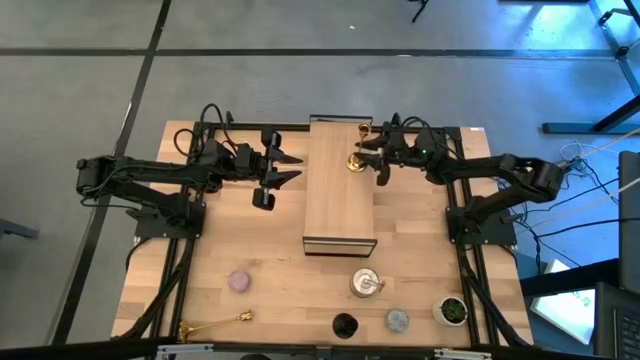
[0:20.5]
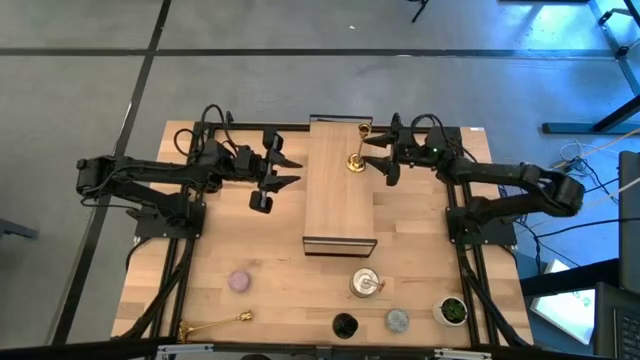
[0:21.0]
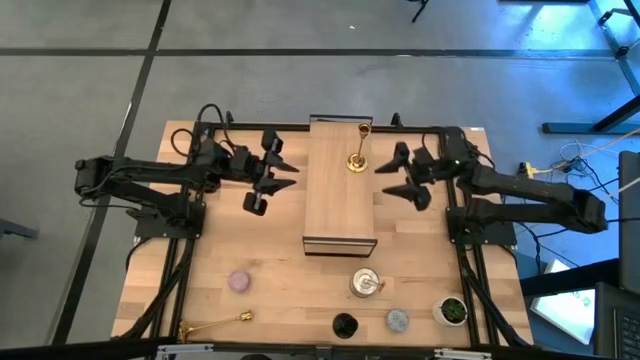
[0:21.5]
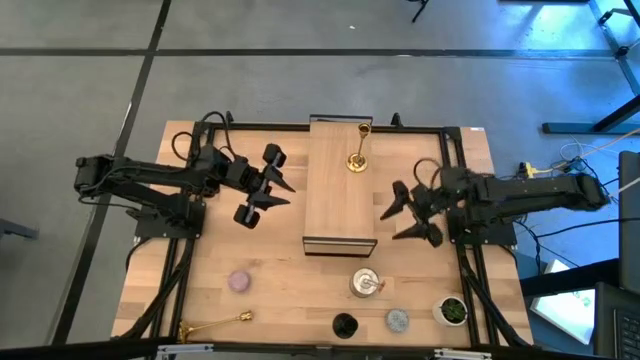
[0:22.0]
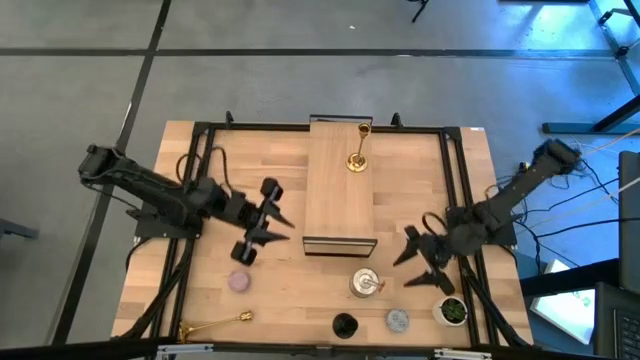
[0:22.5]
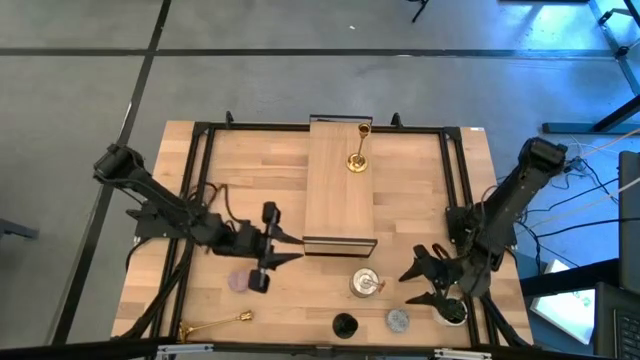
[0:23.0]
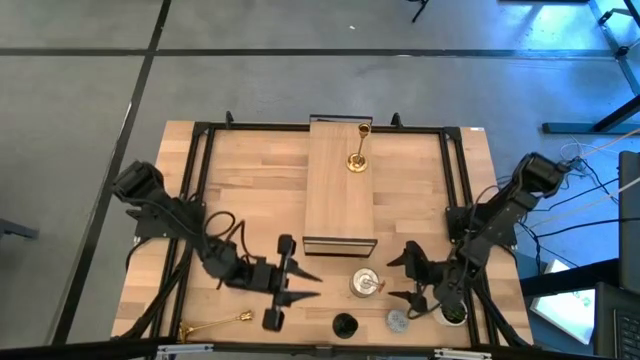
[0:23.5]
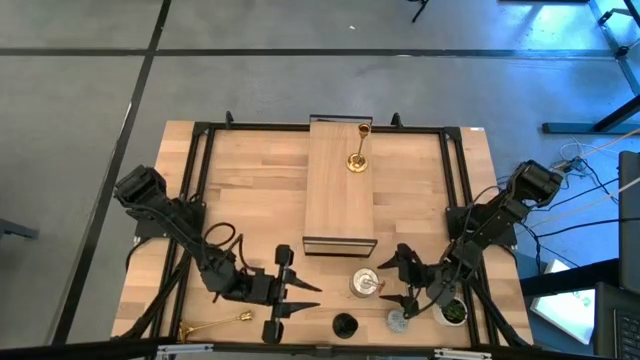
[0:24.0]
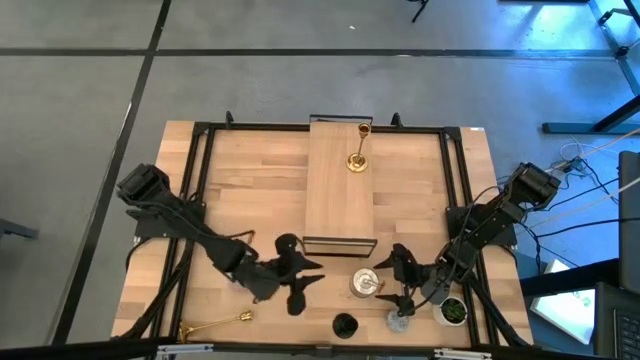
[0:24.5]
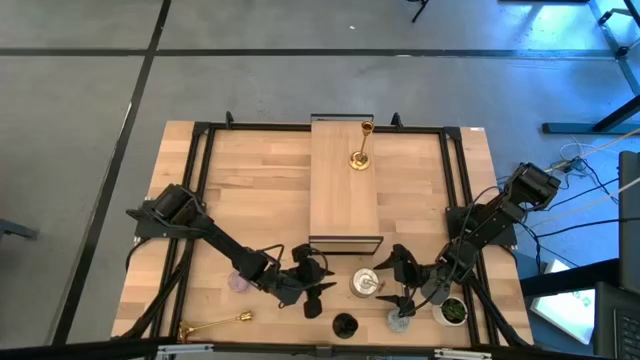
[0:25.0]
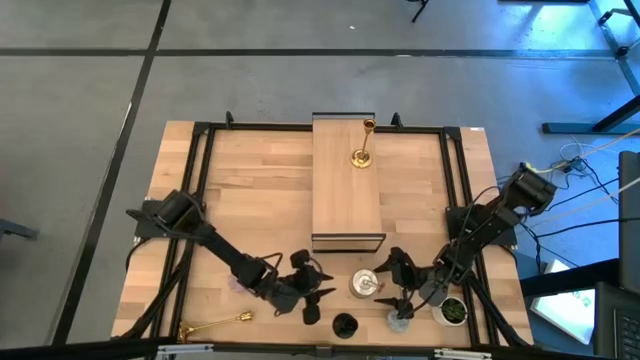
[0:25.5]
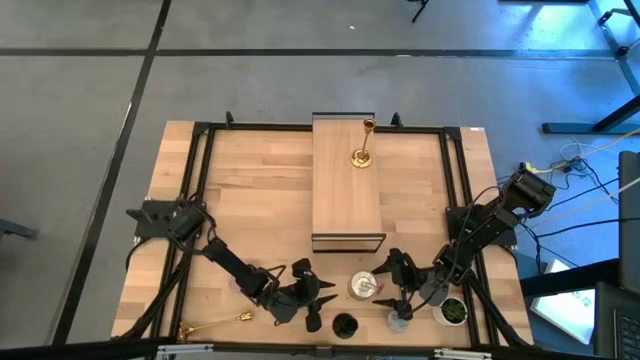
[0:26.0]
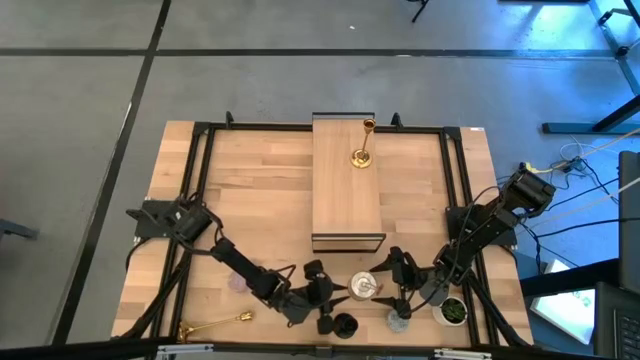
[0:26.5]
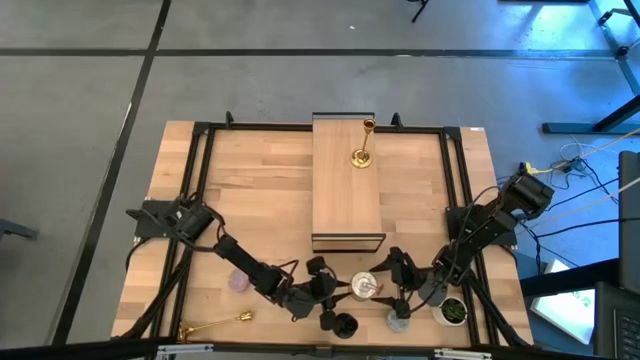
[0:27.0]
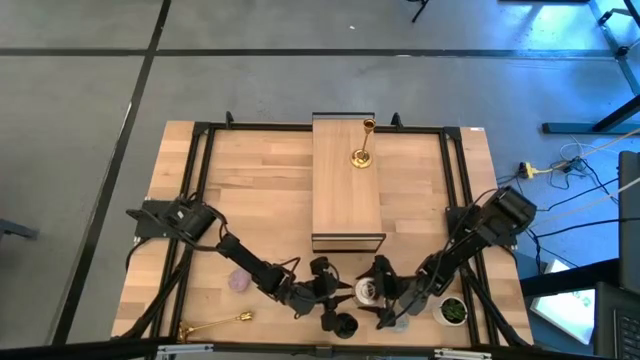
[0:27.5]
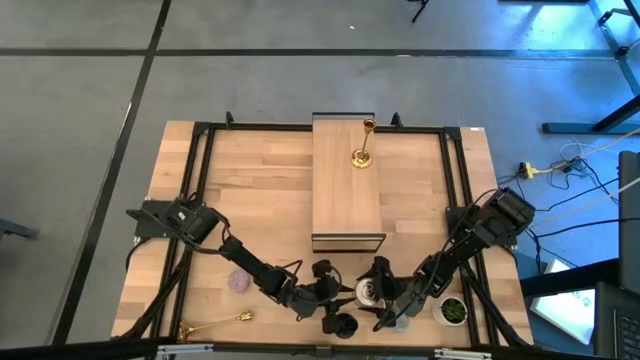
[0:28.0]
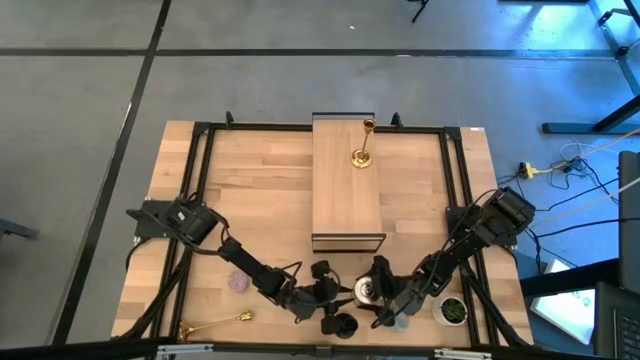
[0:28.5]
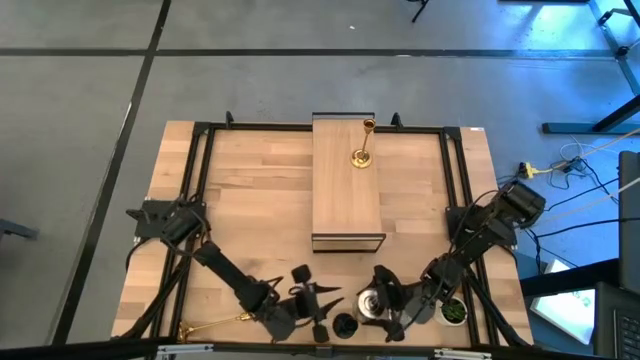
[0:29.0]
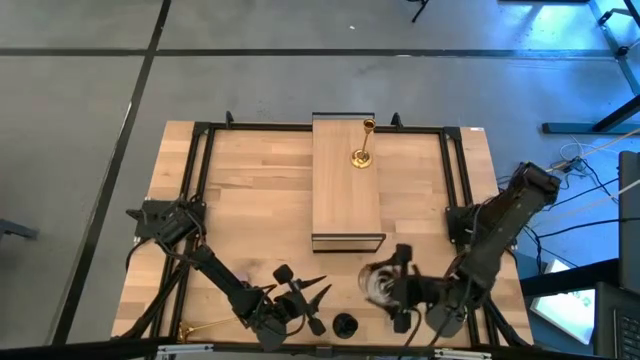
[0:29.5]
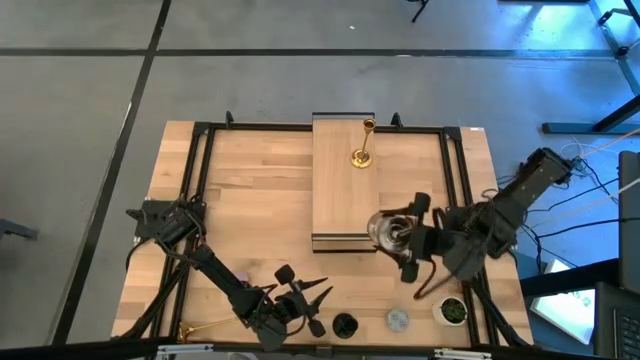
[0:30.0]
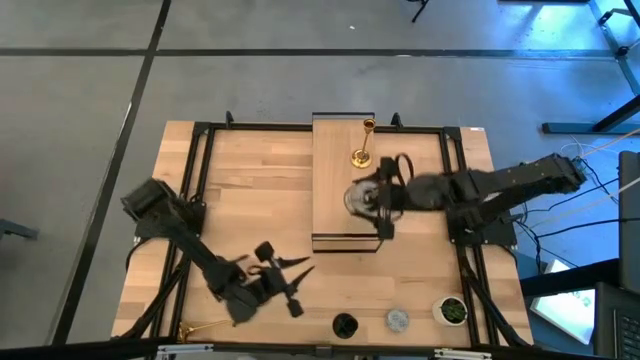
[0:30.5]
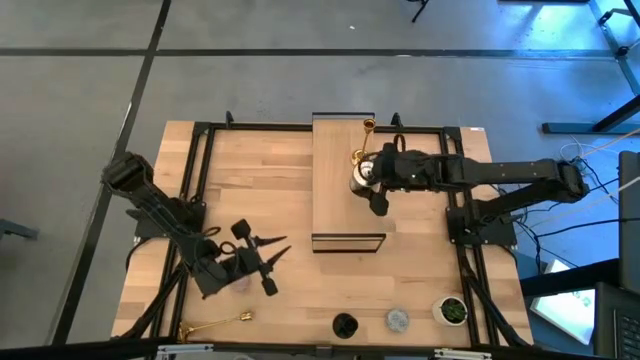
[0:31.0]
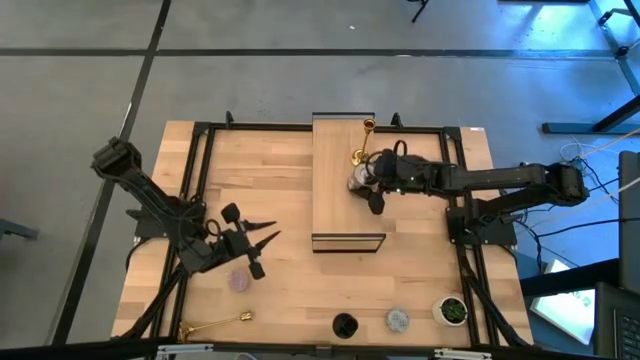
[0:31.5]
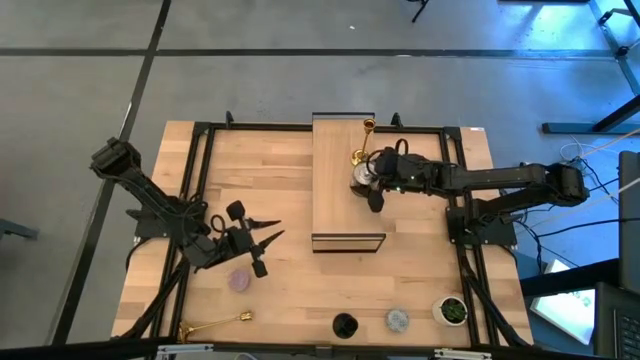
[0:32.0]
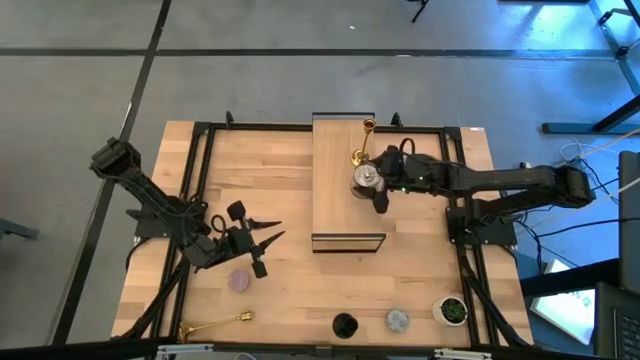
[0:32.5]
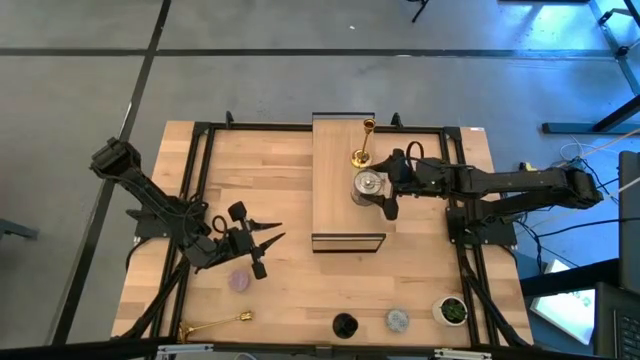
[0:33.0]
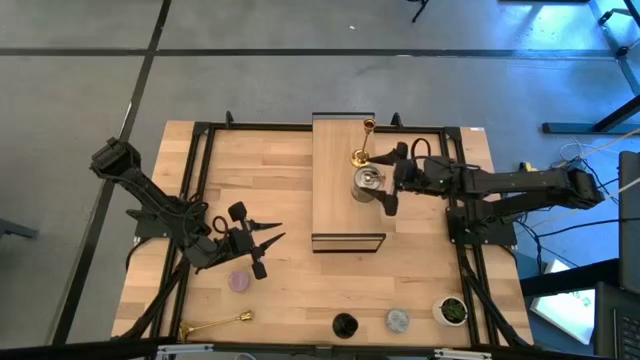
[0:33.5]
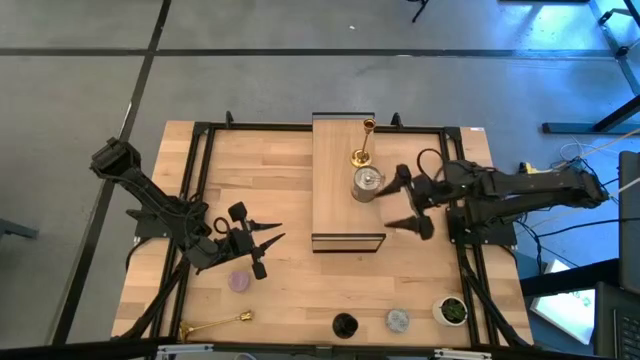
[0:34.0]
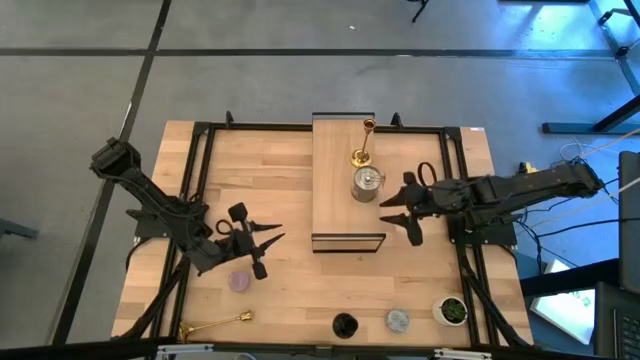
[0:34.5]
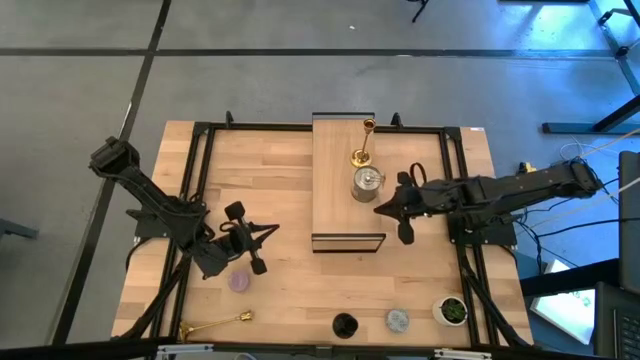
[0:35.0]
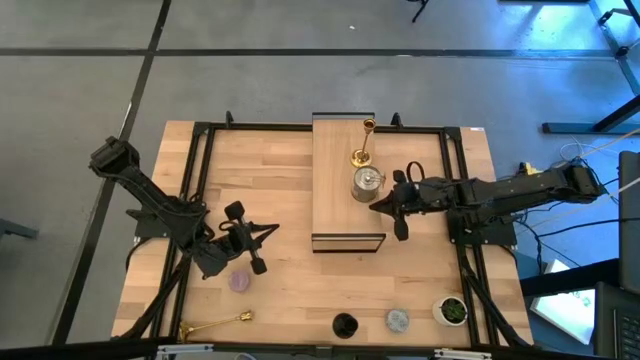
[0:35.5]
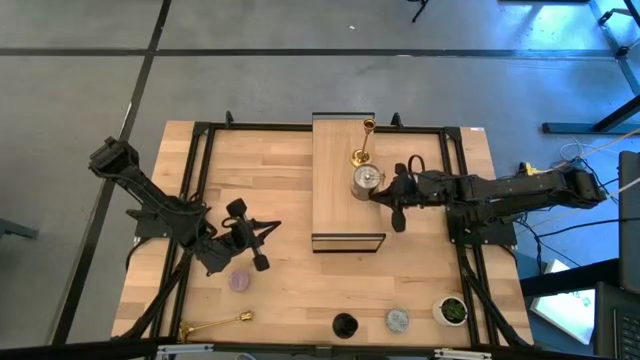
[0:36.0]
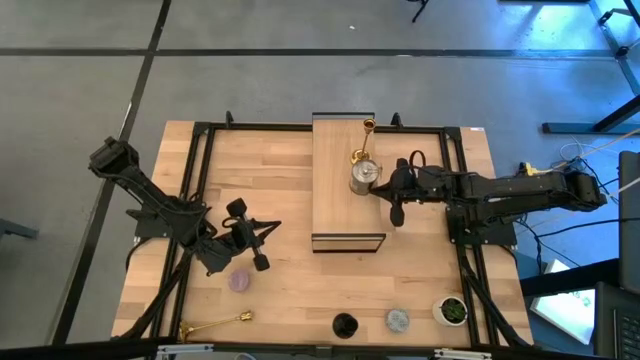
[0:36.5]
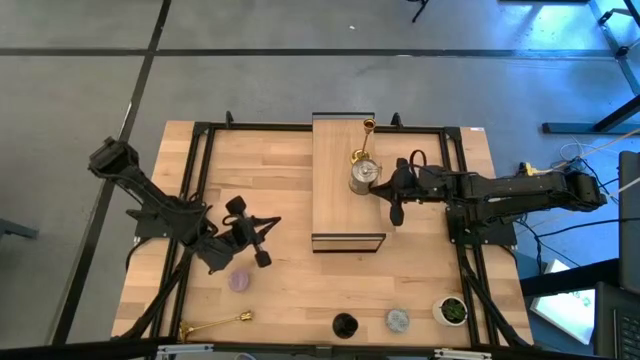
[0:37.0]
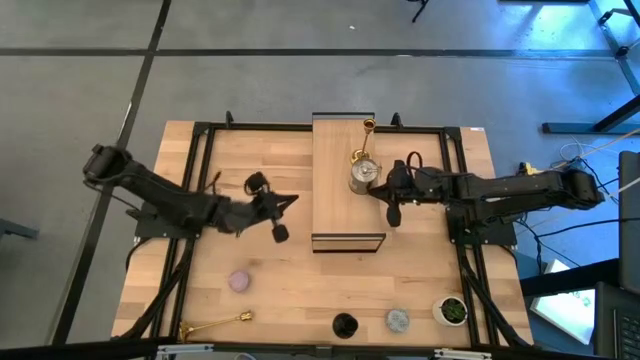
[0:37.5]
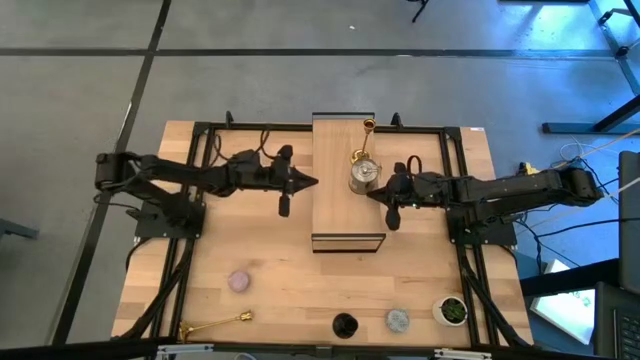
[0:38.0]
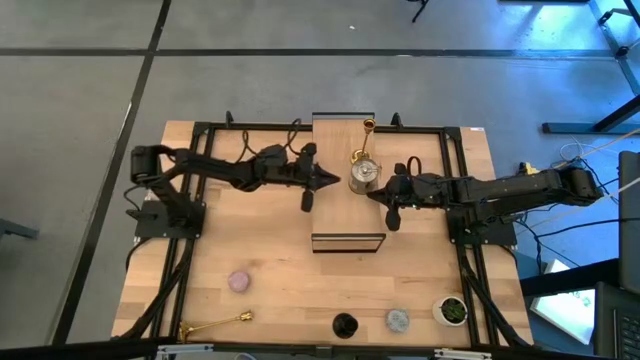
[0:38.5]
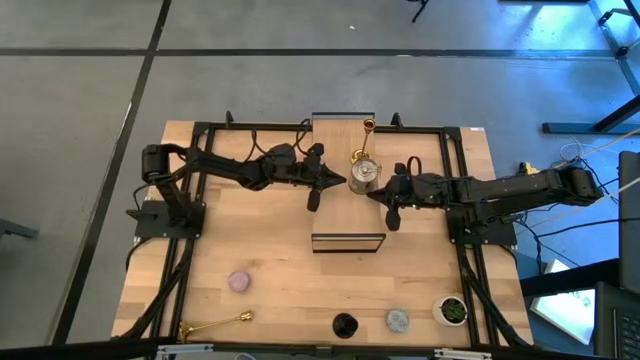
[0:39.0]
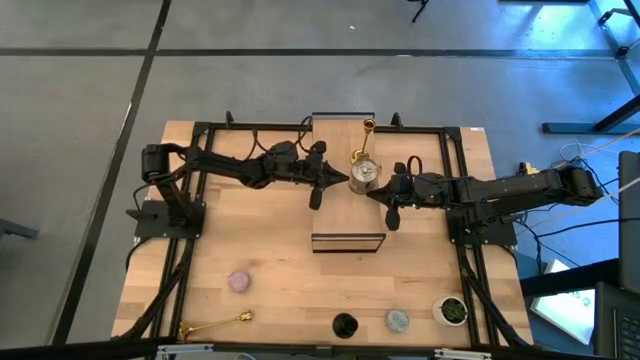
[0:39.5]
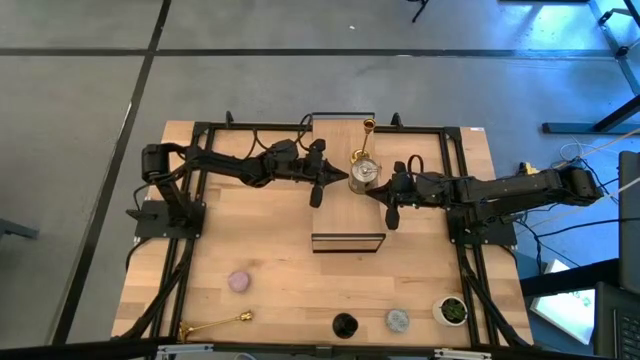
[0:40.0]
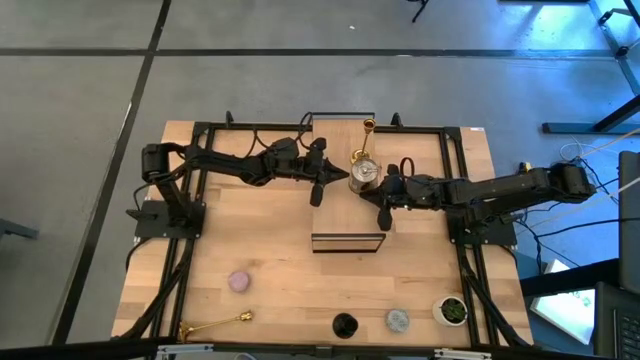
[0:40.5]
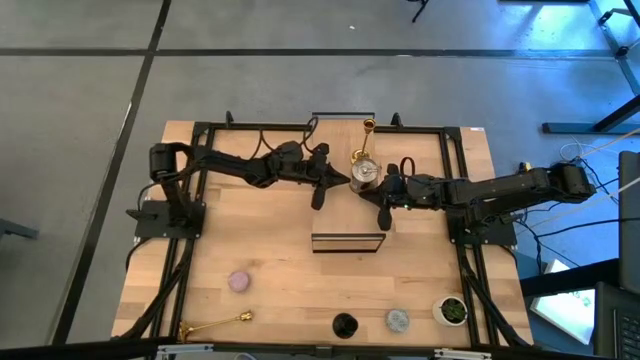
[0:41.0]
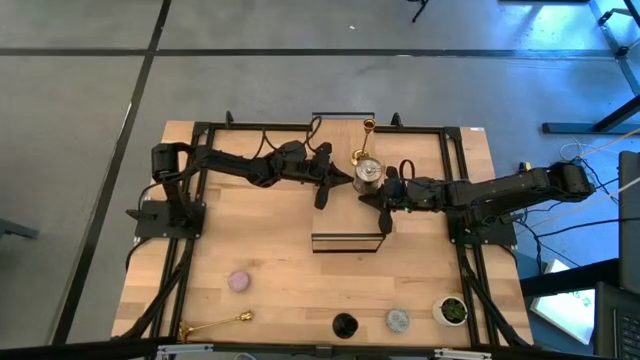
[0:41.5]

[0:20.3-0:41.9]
Task: Pick & Place candle stick holders
Put the brown scented candle on the shelf
